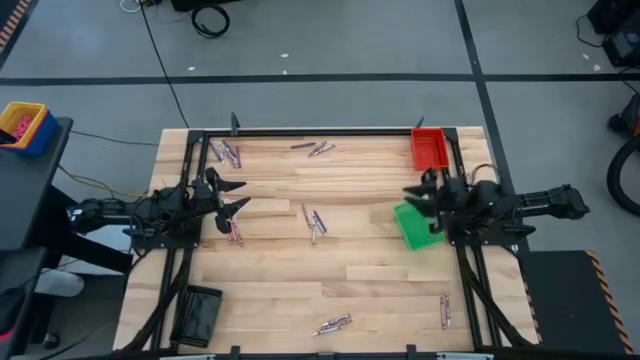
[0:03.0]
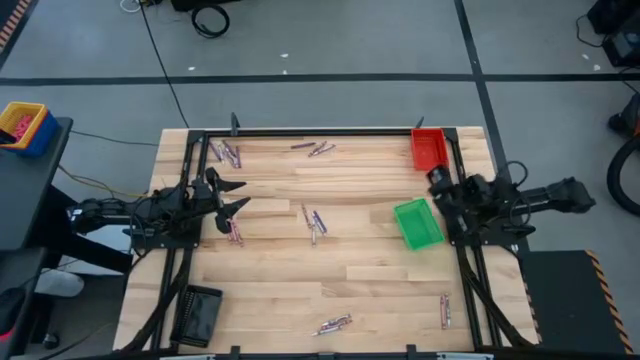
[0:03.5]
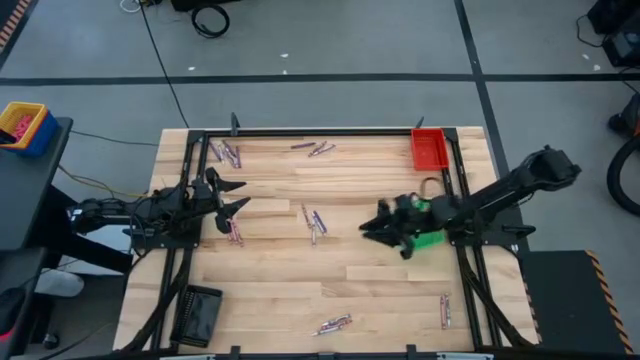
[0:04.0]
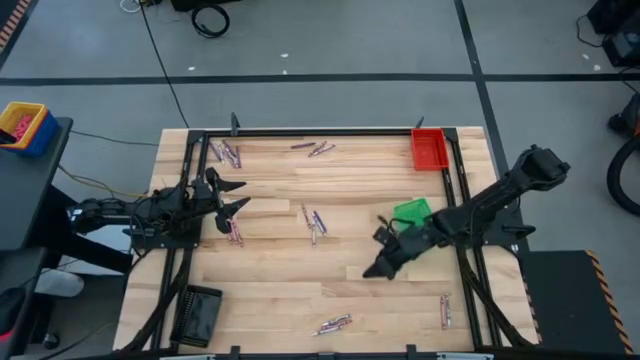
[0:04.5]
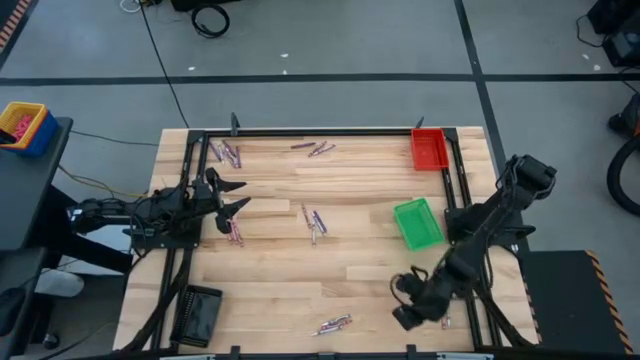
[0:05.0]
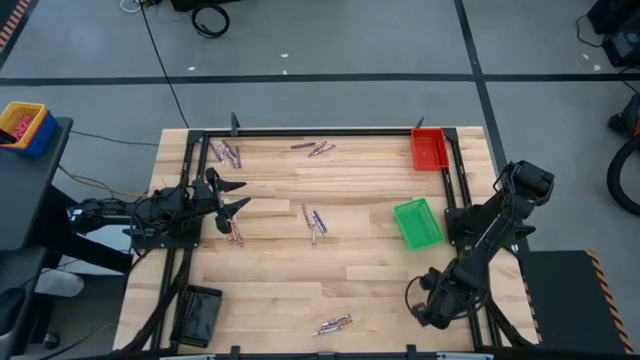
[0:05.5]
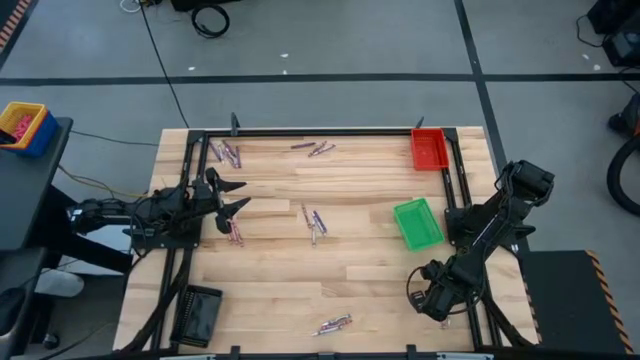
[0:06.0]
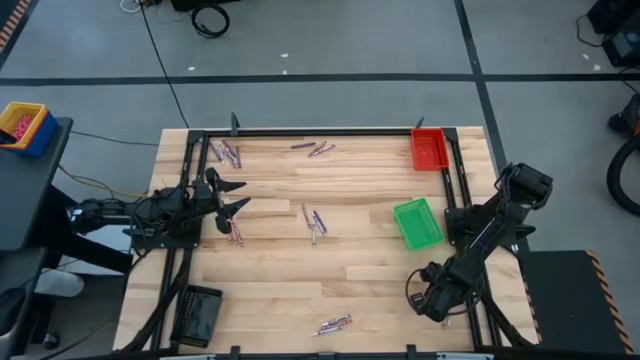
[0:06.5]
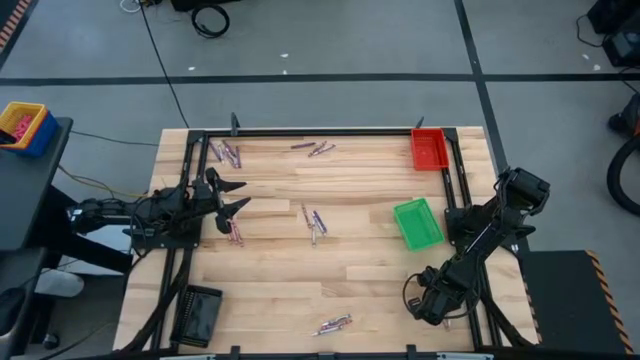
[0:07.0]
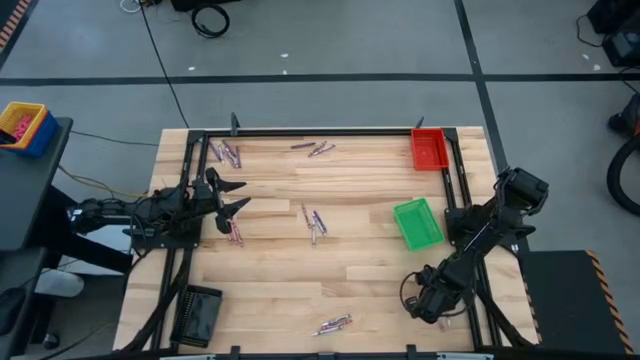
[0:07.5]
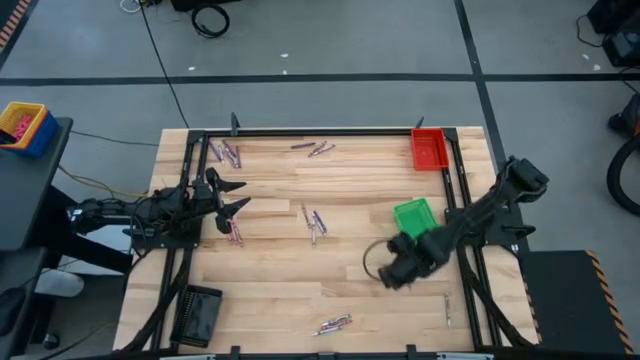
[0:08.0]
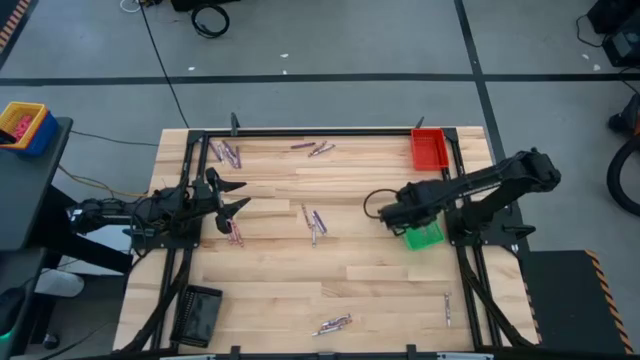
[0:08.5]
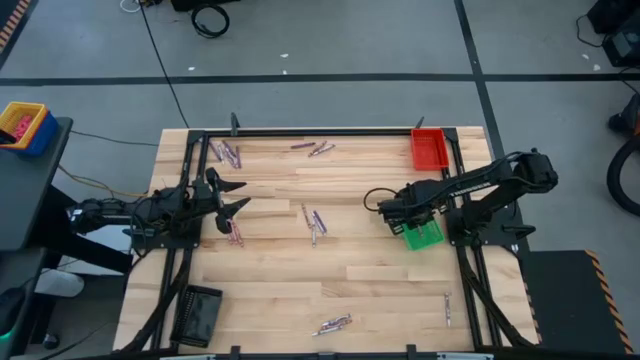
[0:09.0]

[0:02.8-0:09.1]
Task: Sort crayons
Put the pink crayon into the green bin

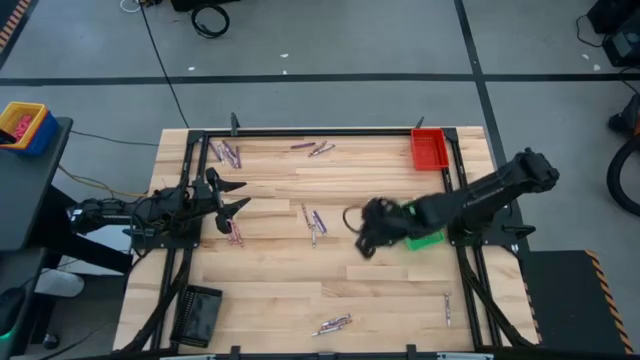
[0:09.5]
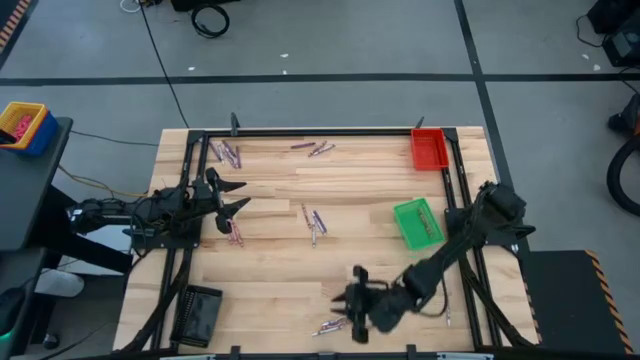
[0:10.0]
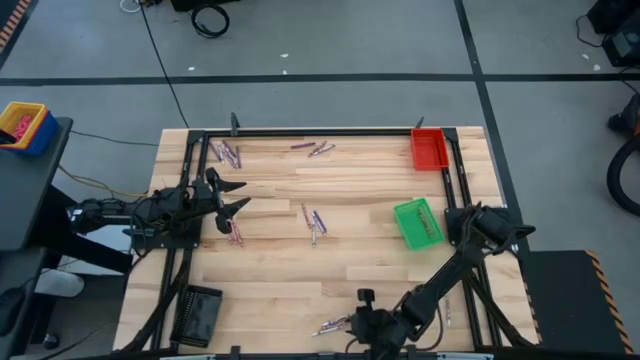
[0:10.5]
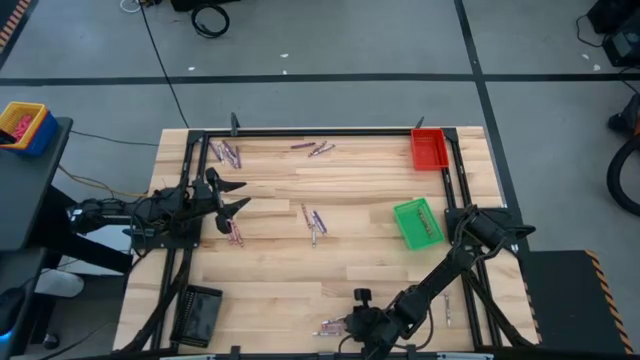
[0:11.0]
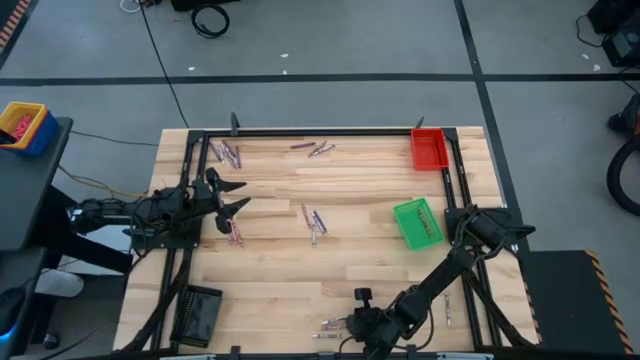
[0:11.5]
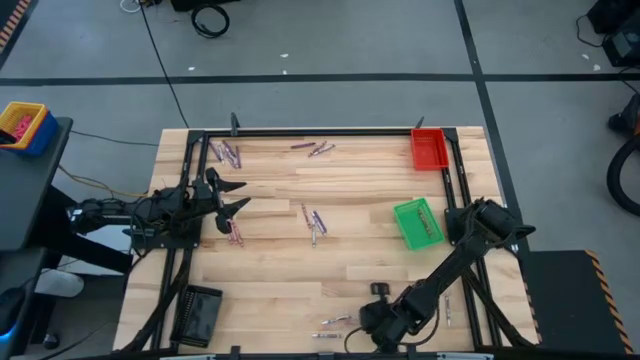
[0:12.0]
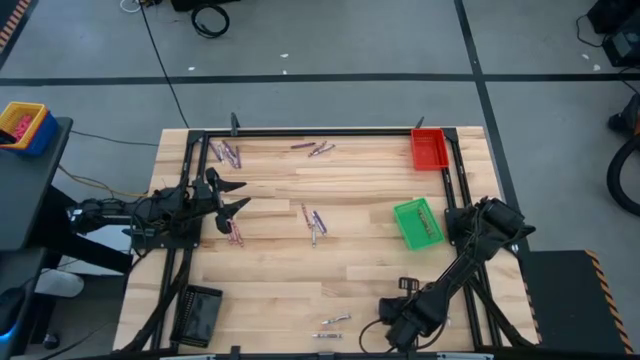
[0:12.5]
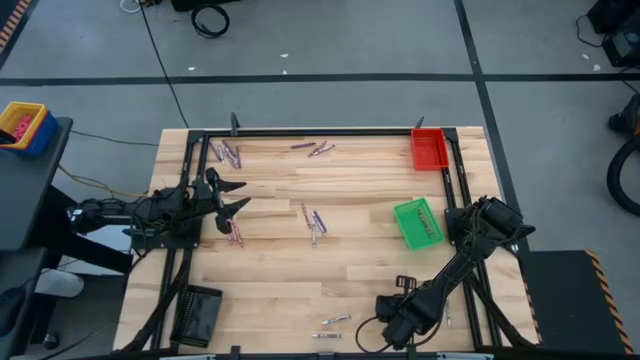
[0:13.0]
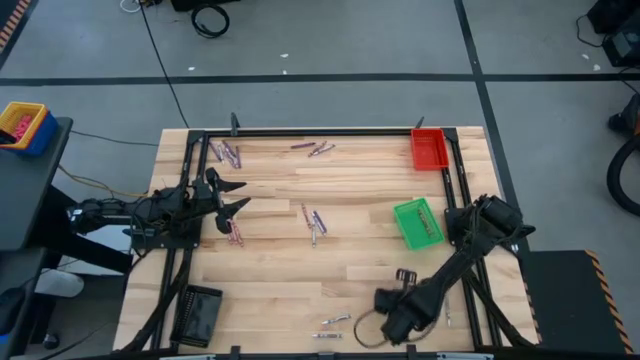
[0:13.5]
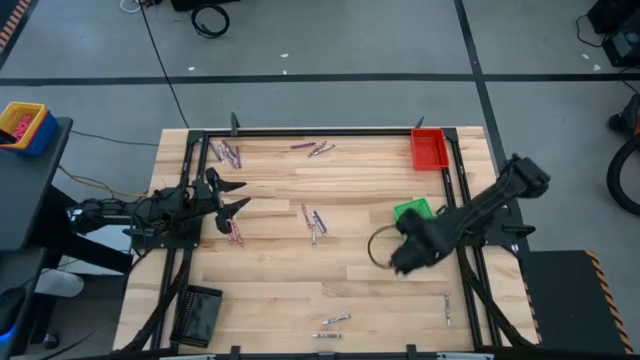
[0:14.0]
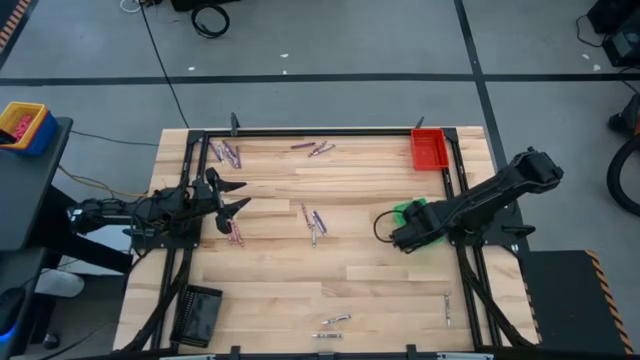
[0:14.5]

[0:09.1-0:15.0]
Put the pink crayon into the green bin

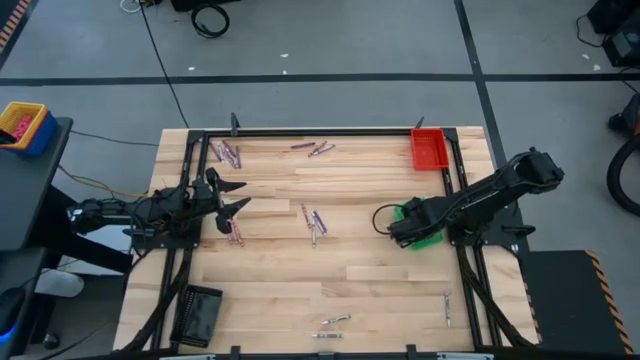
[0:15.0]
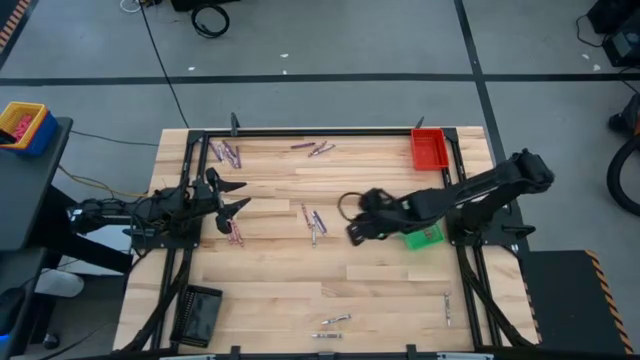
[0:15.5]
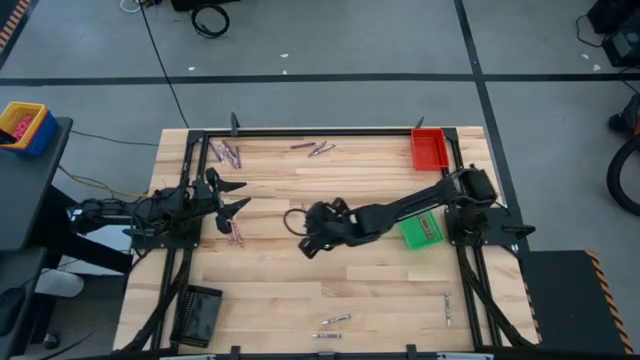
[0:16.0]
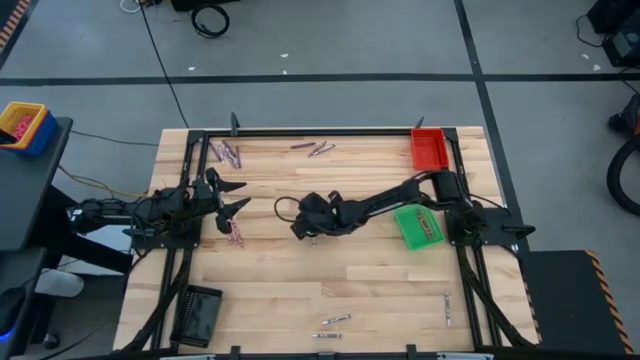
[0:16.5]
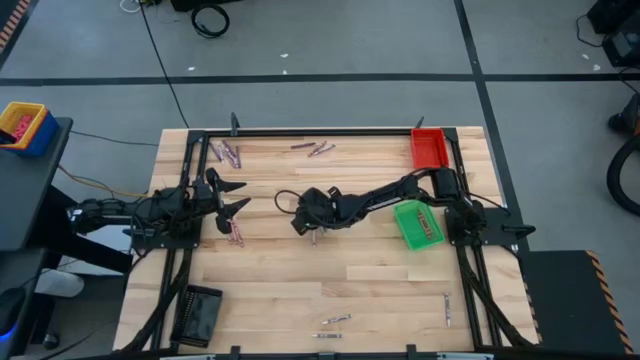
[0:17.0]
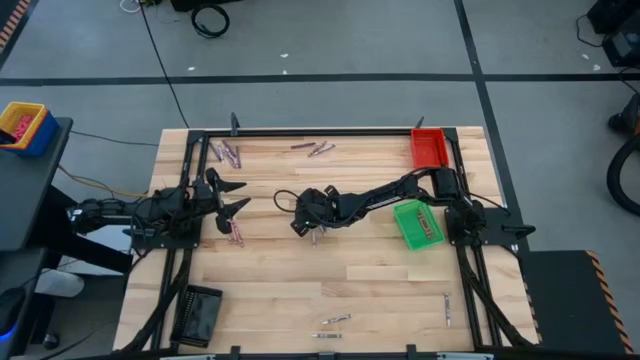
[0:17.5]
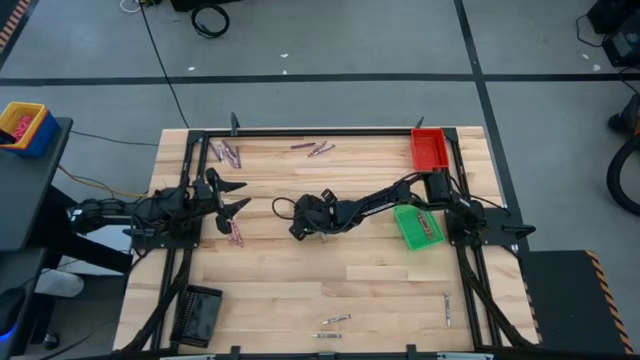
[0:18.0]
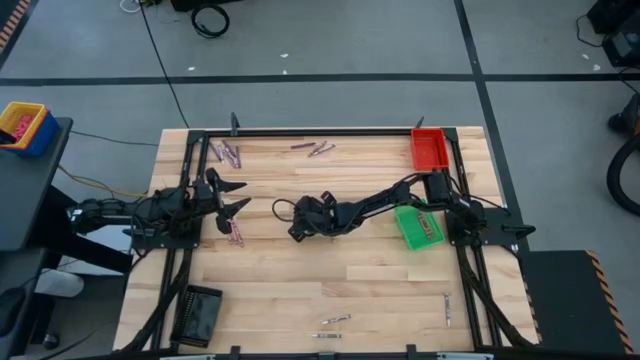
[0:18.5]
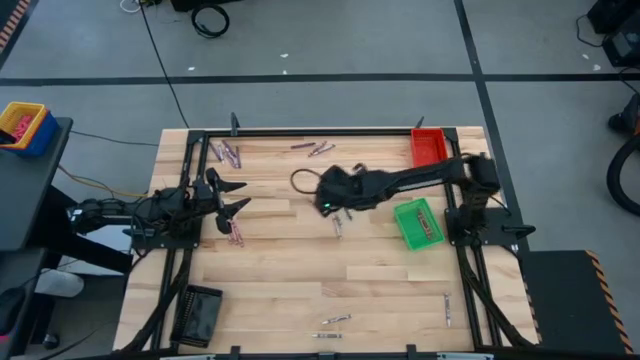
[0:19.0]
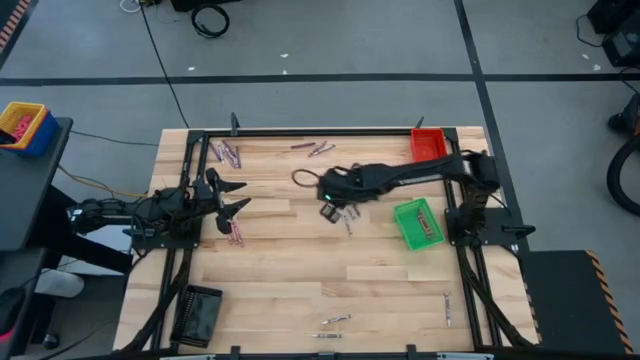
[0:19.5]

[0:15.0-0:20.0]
Put the pink crayon into the green bin

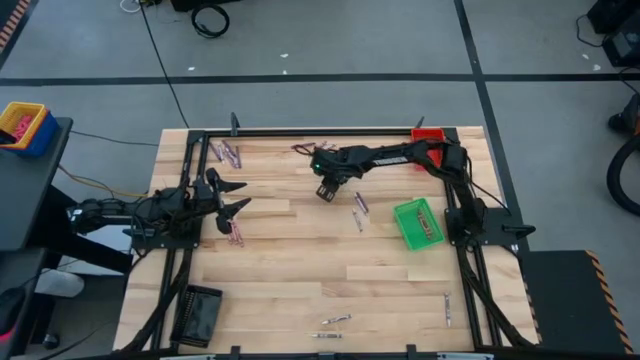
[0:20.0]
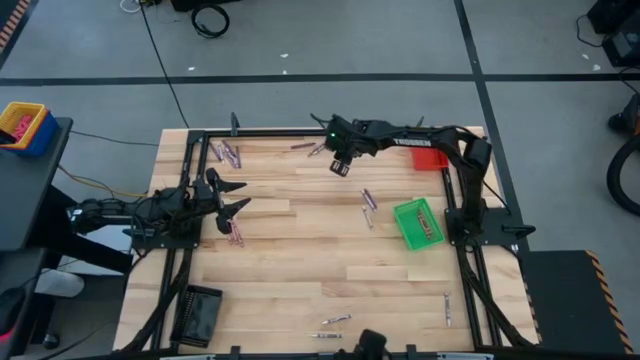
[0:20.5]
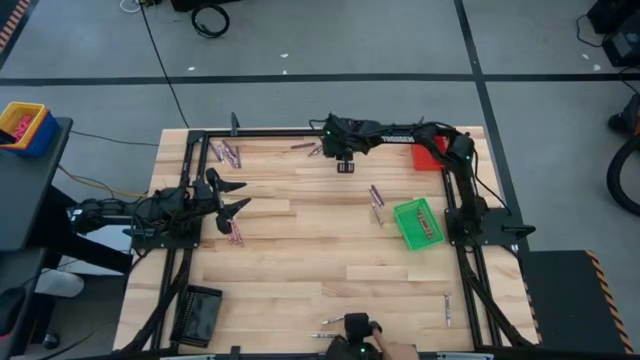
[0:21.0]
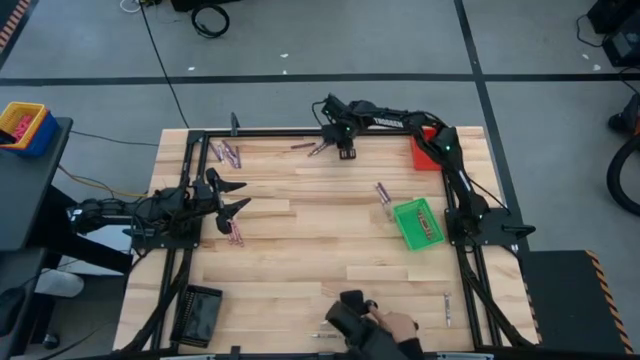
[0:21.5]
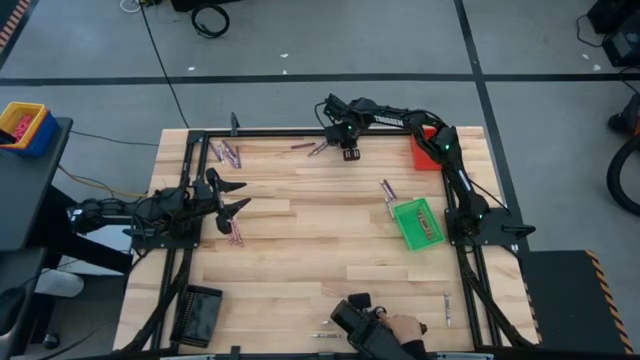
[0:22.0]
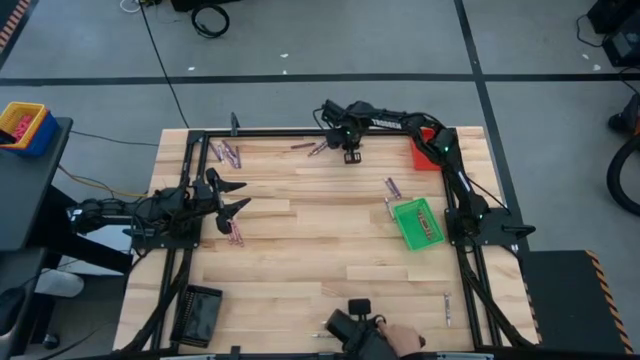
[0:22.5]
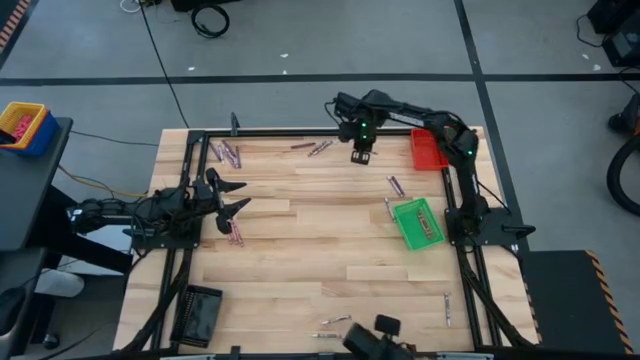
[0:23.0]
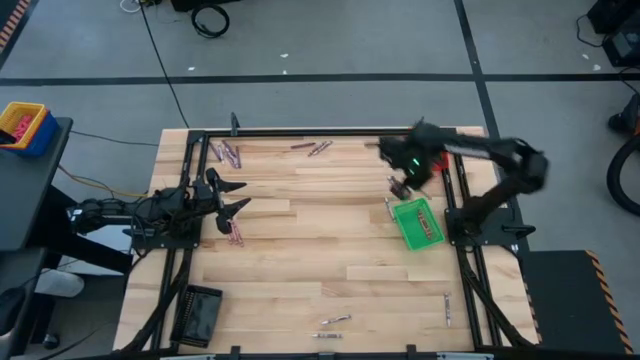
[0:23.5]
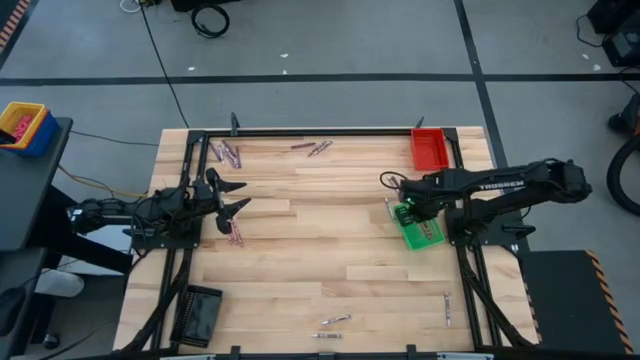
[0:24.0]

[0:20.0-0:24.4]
Put the pink crayon into the green bin
